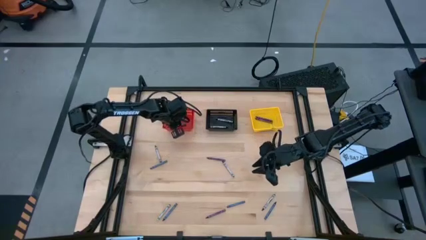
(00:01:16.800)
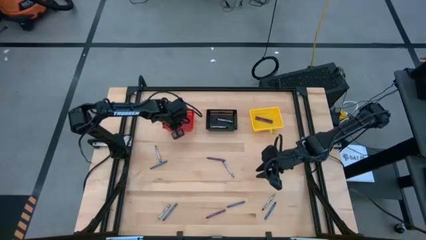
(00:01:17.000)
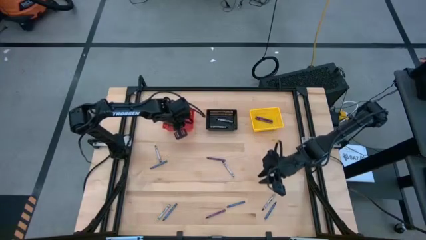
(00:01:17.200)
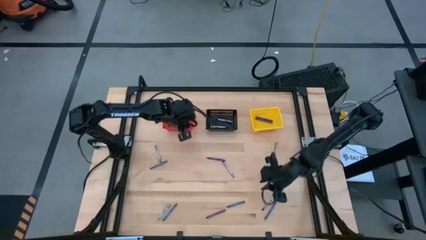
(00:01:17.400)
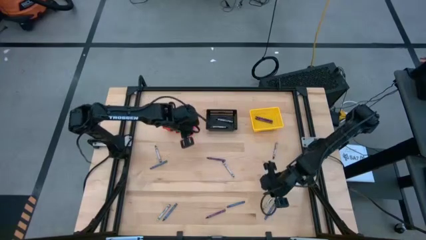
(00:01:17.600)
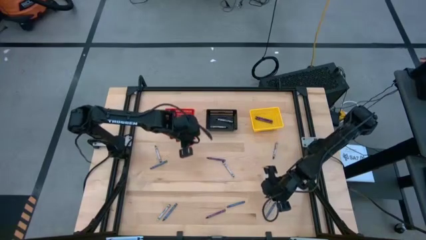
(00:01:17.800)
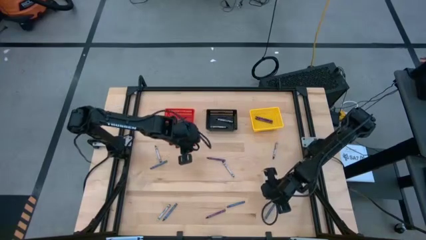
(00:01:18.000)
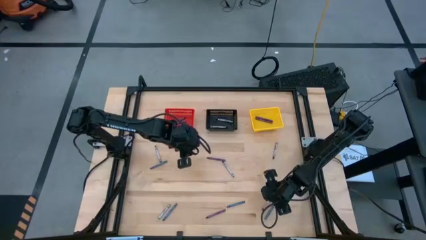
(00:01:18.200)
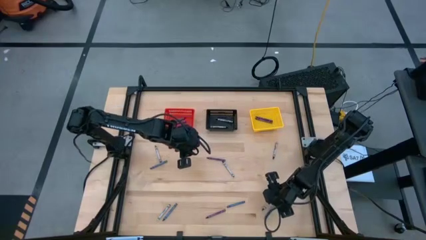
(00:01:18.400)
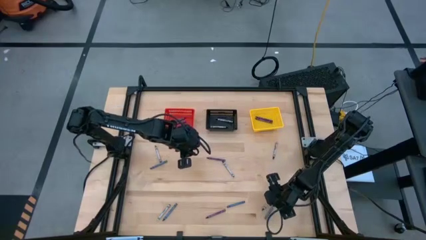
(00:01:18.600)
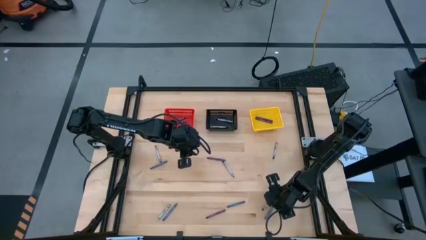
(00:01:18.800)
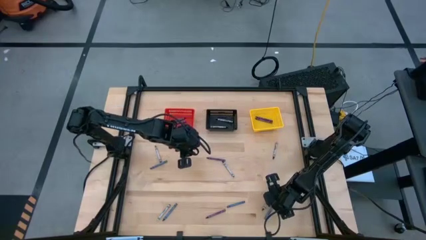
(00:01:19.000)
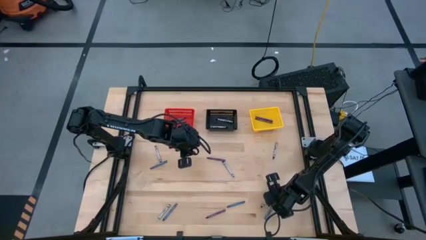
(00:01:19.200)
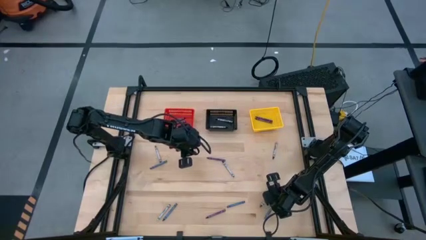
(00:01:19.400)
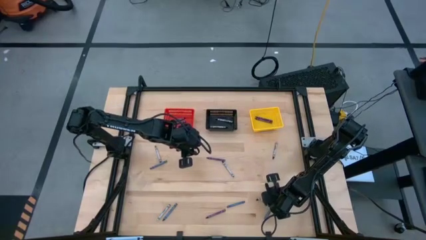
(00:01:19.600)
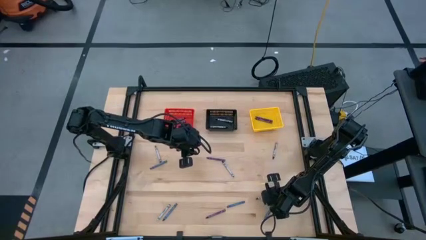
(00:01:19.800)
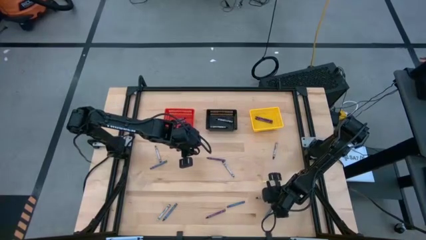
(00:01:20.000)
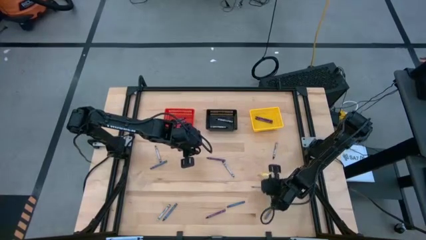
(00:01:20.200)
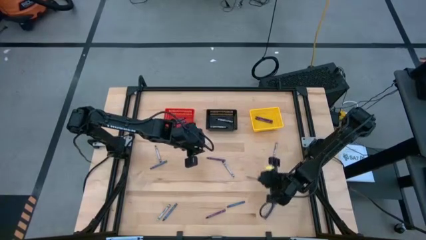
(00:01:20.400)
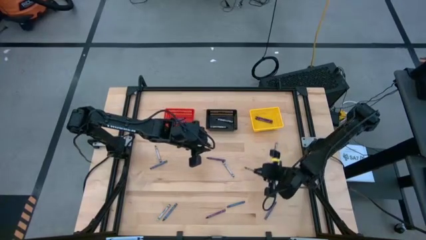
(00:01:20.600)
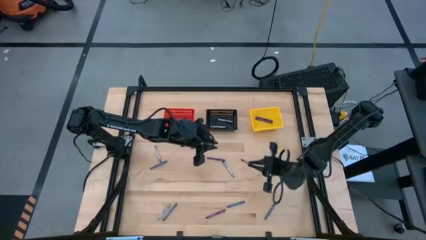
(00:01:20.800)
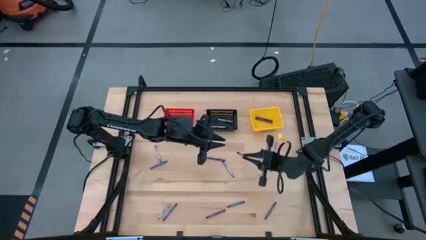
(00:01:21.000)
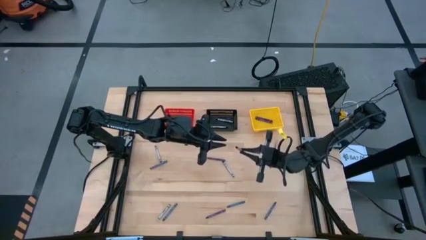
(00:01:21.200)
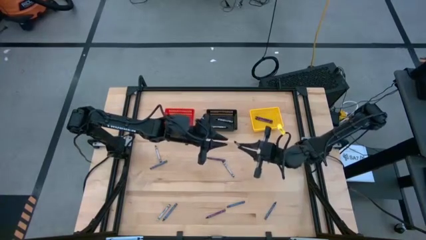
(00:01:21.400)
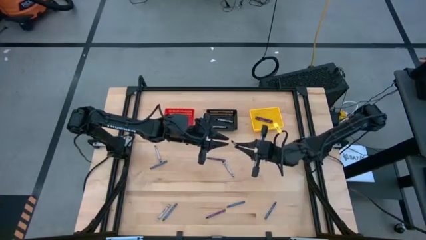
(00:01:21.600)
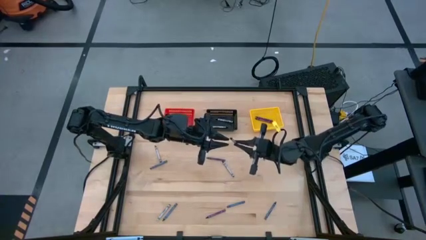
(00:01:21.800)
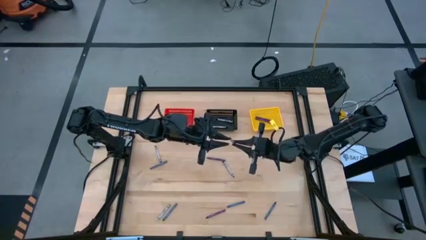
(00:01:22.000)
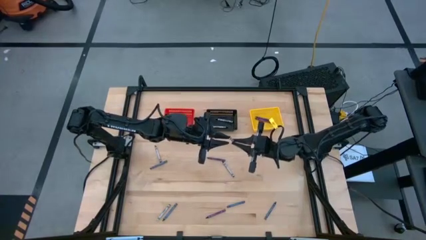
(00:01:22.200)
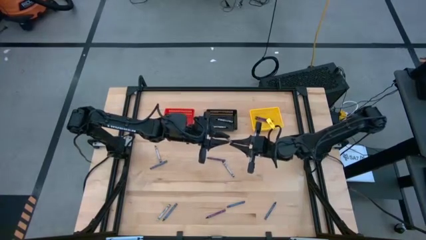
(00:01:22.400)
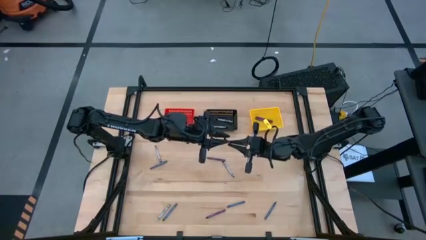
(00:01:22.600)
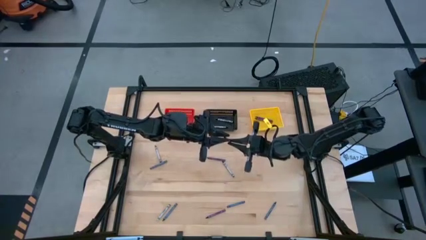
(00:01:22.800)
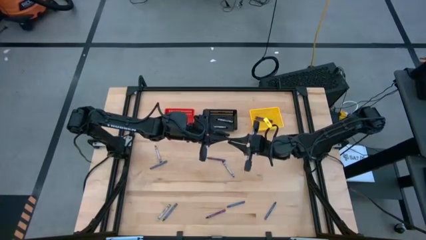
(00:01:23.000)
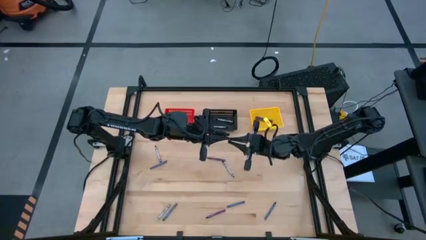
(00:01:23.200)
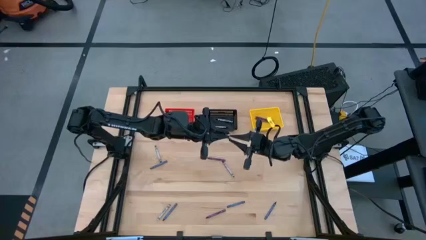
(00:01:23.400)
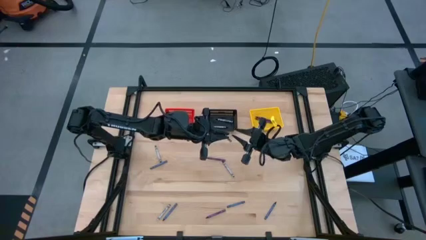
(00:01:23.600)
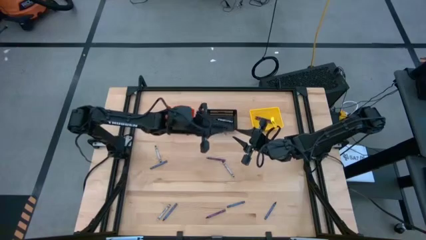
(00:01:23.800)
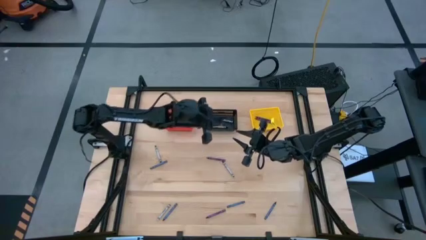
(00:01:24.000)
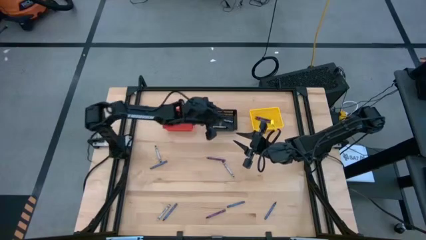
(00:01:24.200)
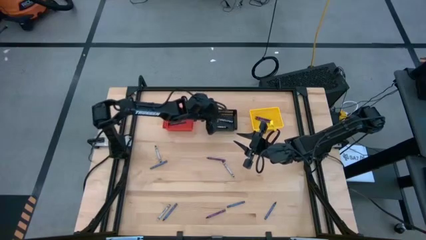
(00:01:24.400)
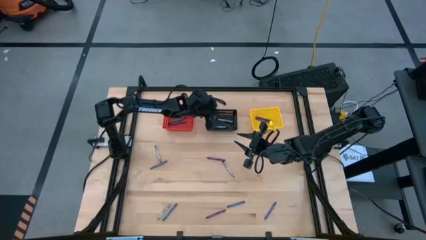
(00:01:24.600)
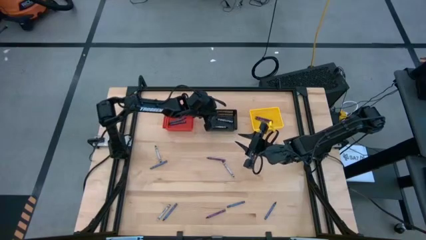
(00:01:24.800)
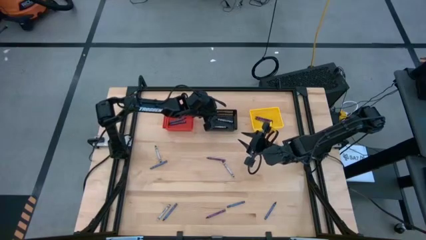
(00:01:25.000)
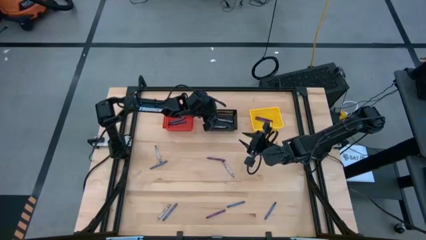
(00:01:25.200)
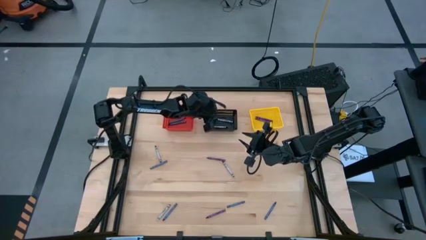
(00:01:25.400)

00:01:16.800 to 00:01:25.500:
Task: Sort crayons
Put the black crayon into the black basket

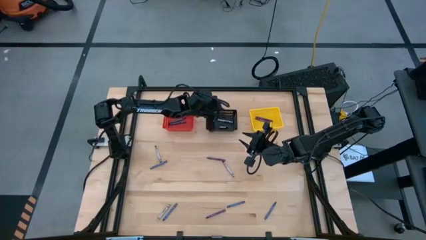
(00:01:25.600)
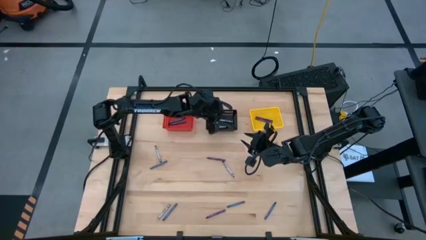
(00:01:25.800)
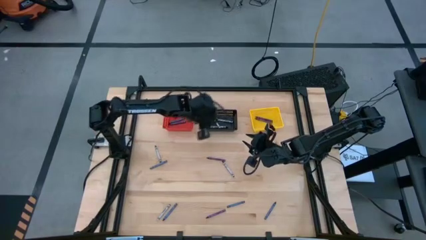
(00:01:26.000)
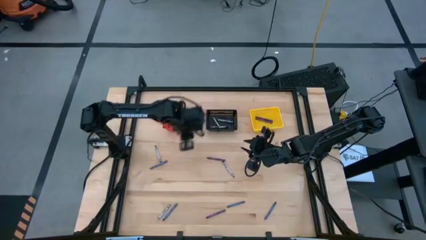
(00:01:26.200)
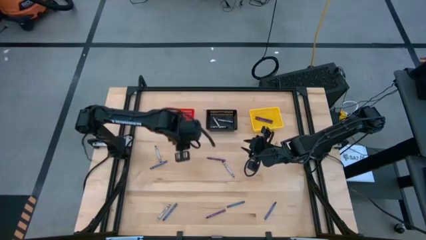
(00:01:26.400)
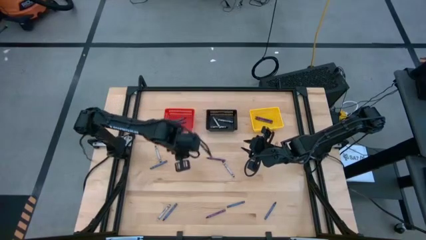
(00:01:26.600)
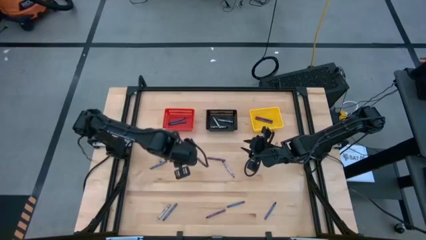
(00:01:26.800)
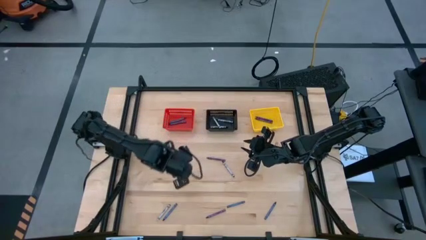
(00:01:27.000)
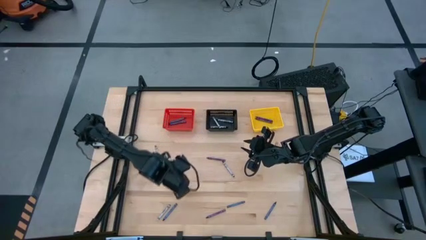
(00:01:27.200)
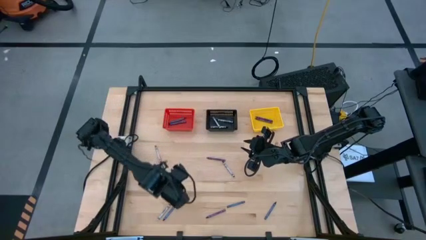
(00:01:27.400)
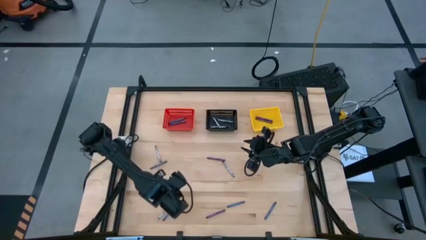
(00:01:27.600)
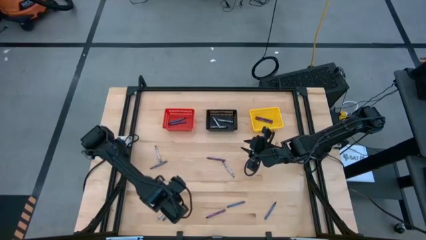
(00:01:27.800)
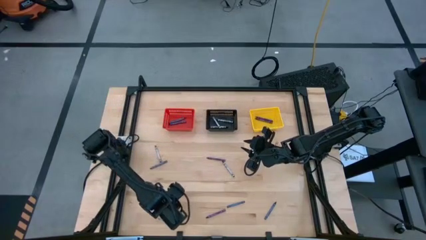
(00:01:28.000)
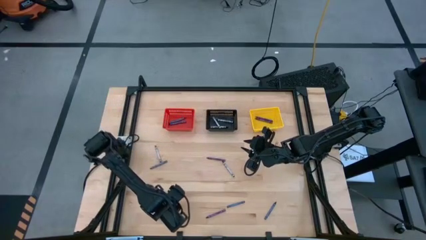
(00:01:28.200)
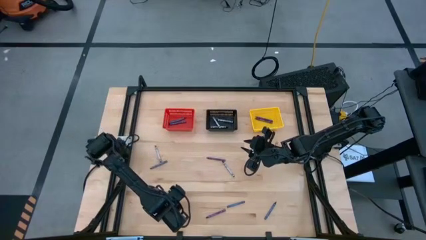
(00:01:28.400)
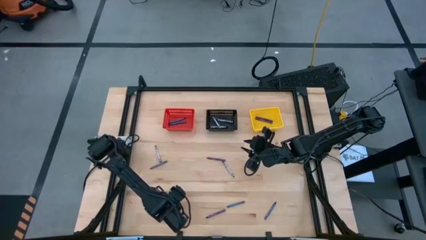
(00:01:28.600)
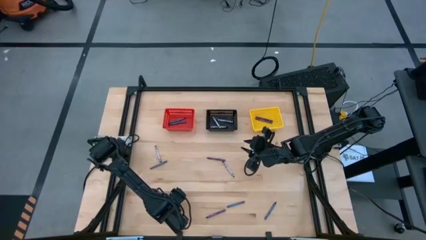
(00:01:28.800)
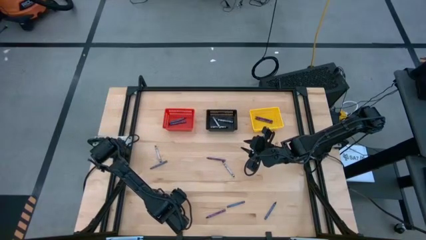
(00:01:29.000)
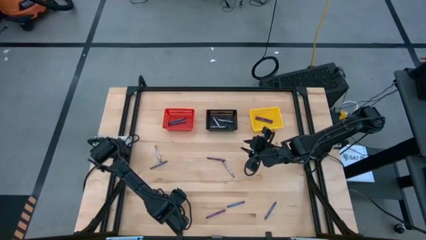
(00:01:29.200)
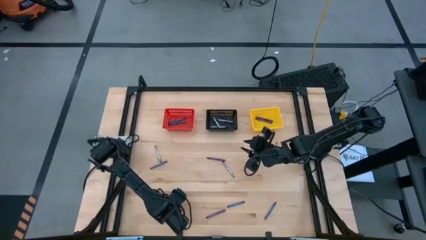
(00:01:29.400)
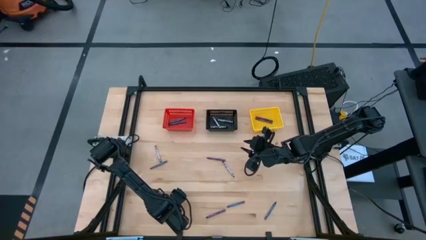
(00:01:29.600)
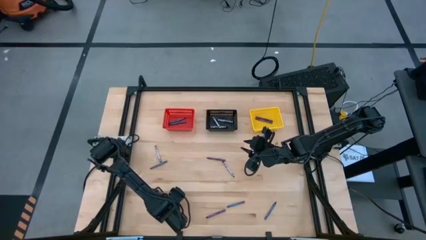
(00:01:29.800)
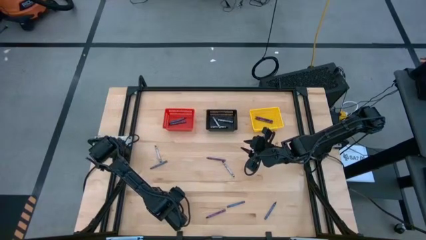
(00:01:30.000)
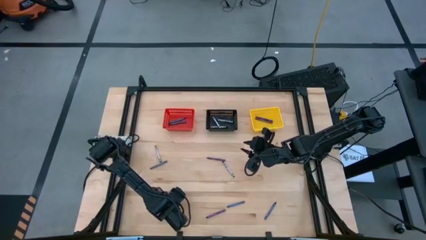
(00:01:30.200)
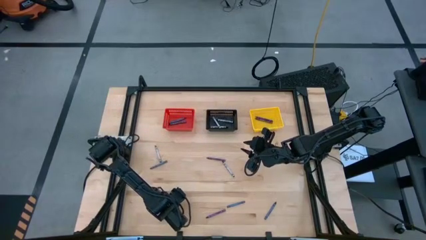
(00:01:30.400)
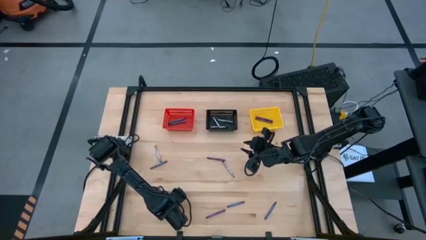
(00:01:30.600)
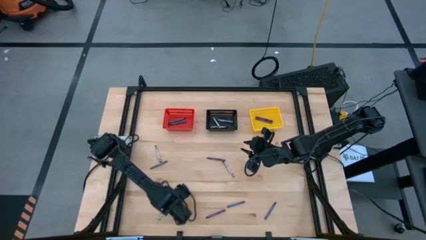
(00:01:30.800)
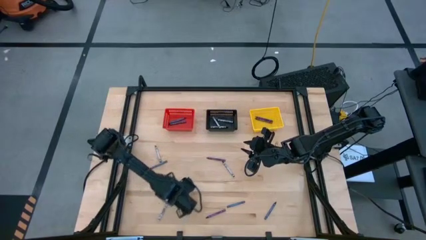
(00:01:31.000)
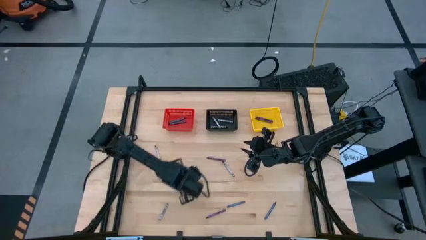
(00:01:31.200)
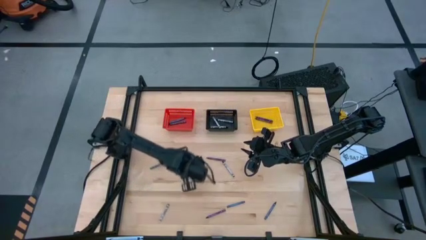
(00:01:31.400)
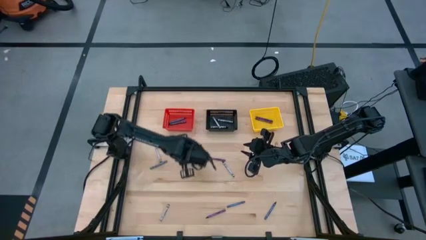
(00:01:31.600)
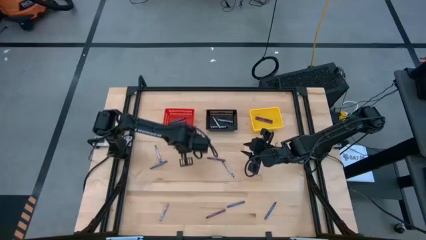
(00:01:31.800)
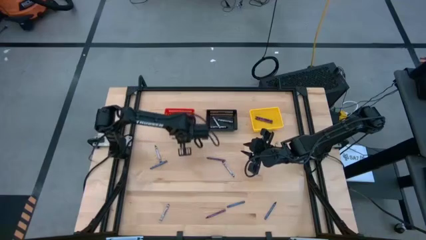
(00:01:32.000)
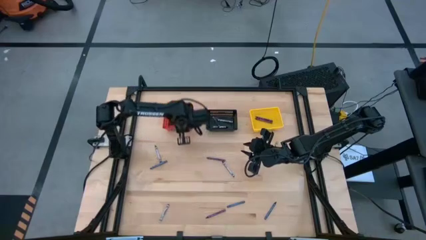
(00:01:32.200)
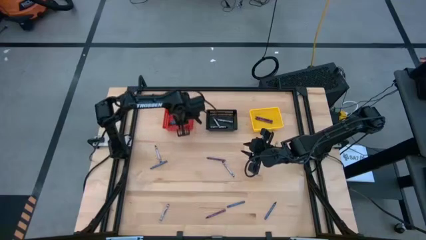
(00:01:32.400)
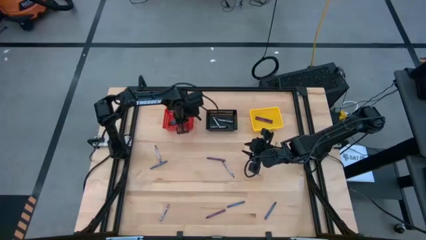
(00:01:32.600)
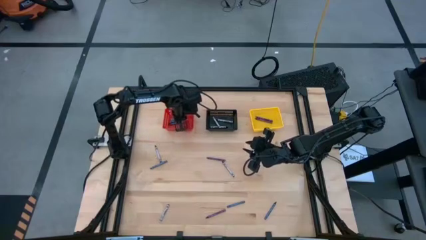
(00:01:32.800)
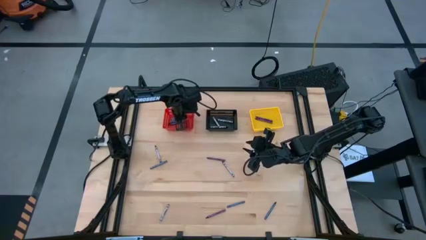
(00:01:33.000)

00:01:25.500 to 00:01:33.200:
Put the blue crayon into the red basket
